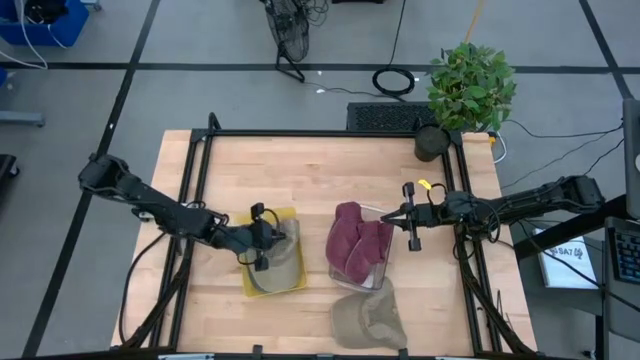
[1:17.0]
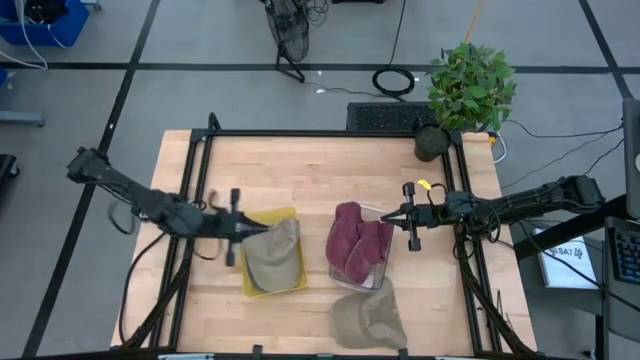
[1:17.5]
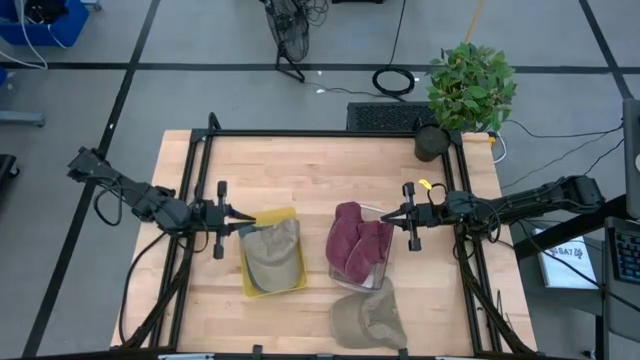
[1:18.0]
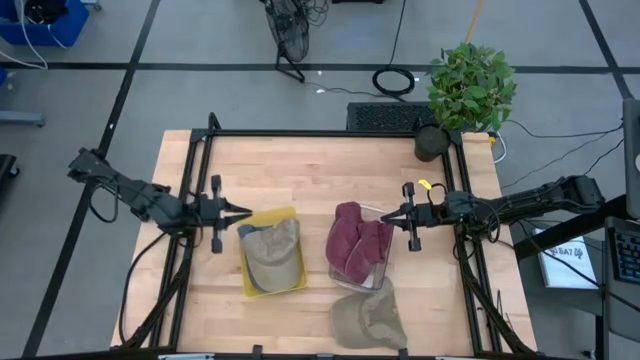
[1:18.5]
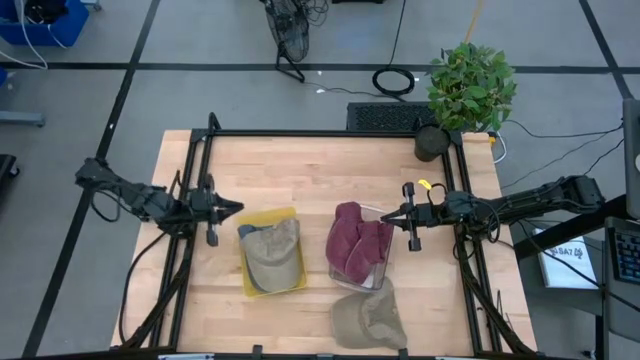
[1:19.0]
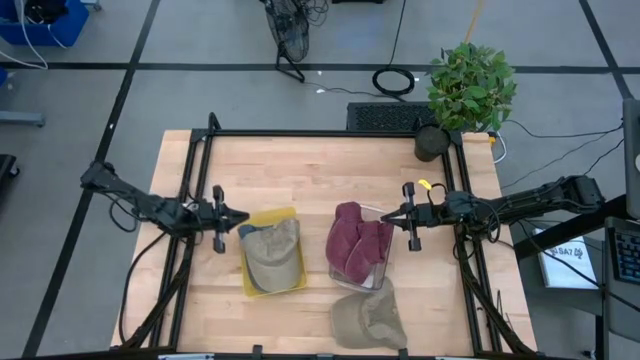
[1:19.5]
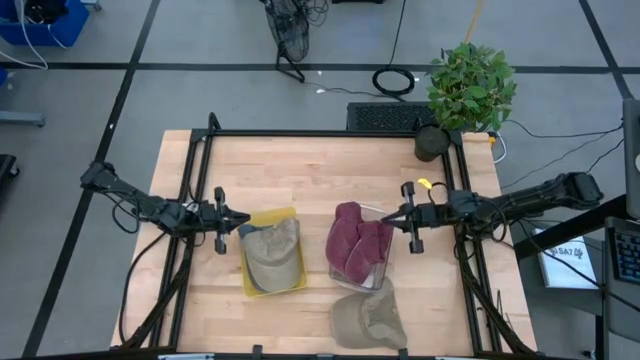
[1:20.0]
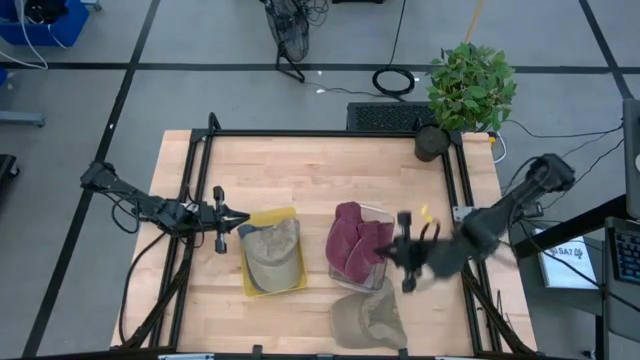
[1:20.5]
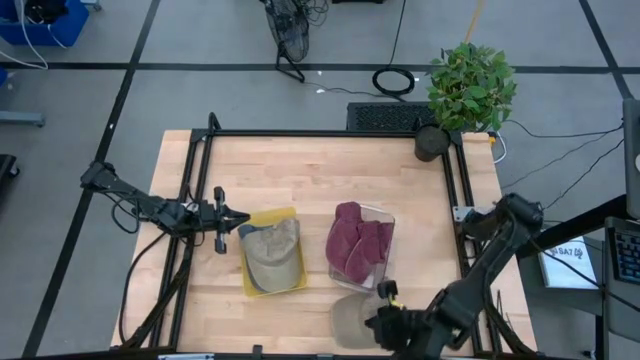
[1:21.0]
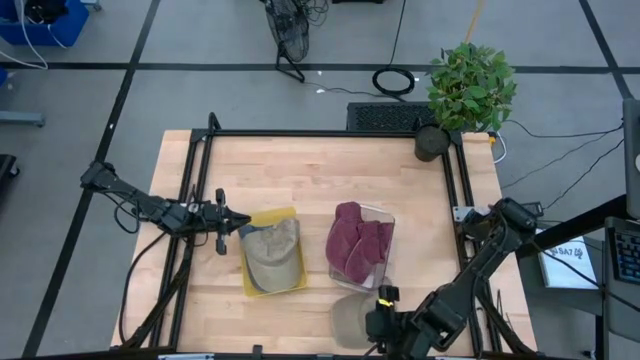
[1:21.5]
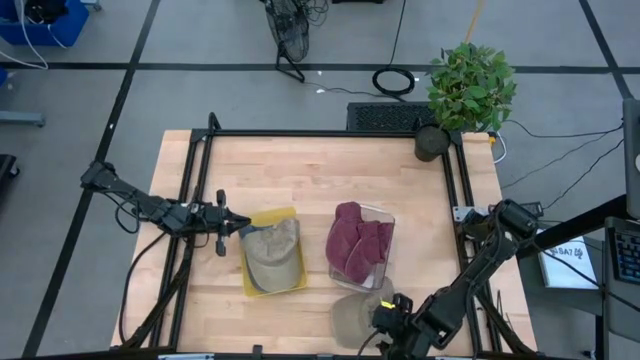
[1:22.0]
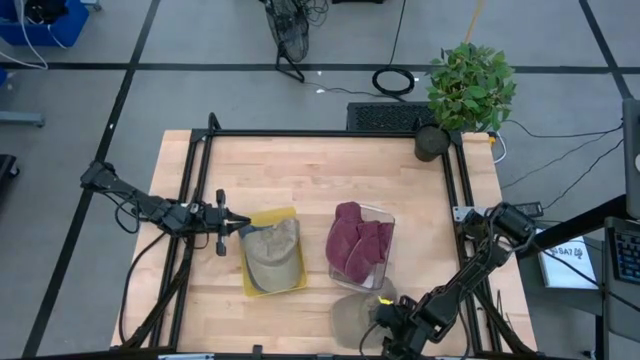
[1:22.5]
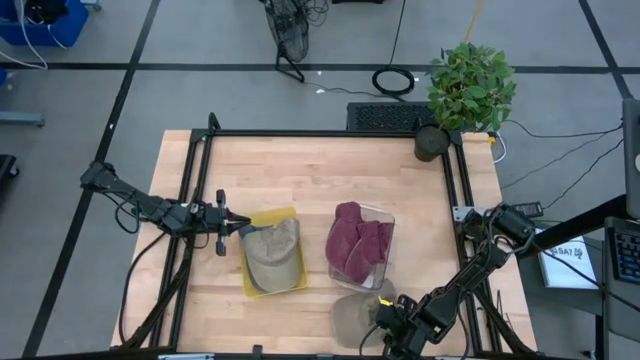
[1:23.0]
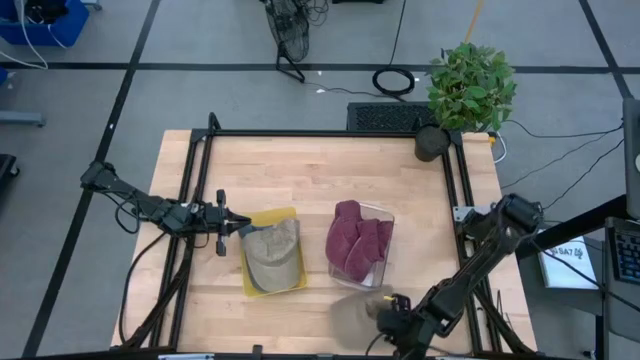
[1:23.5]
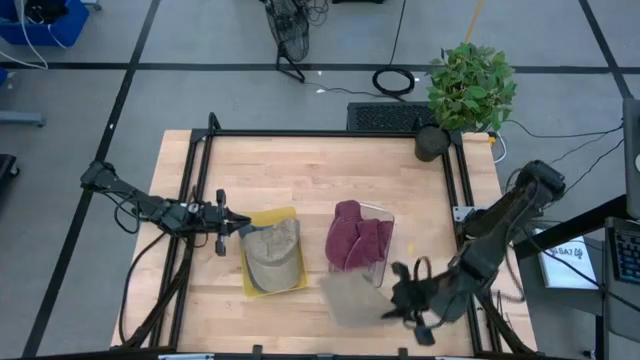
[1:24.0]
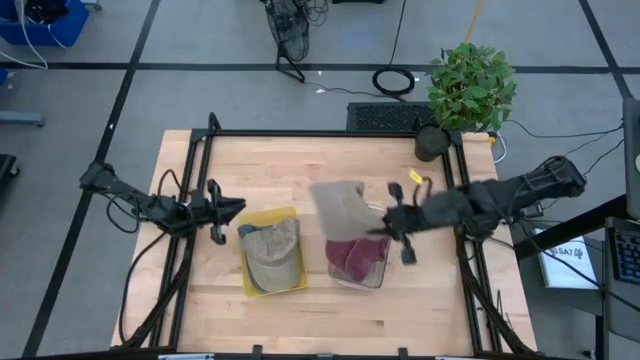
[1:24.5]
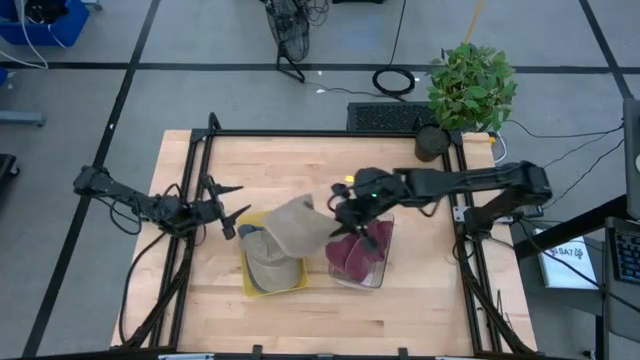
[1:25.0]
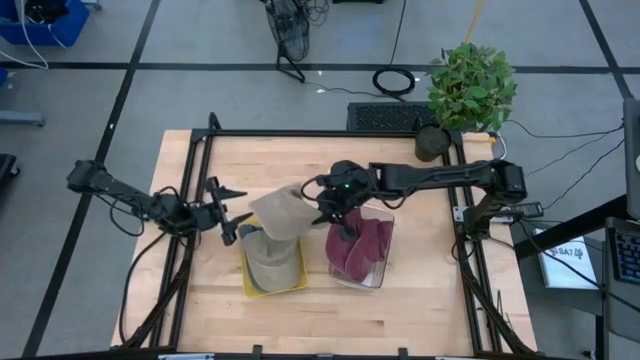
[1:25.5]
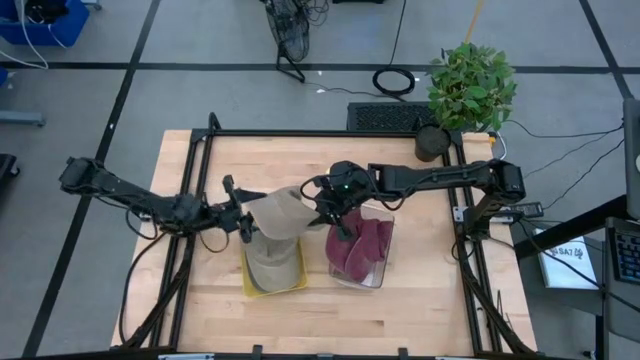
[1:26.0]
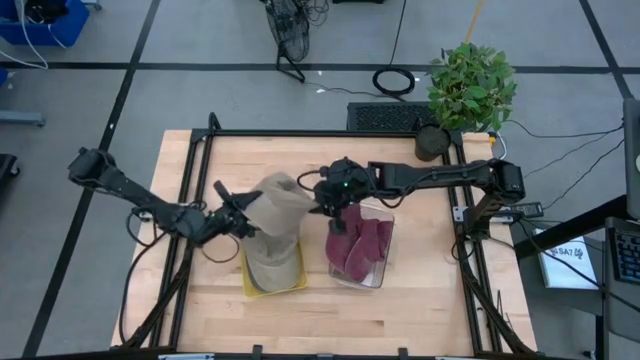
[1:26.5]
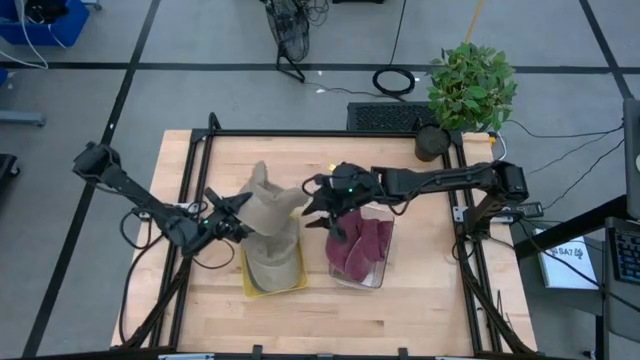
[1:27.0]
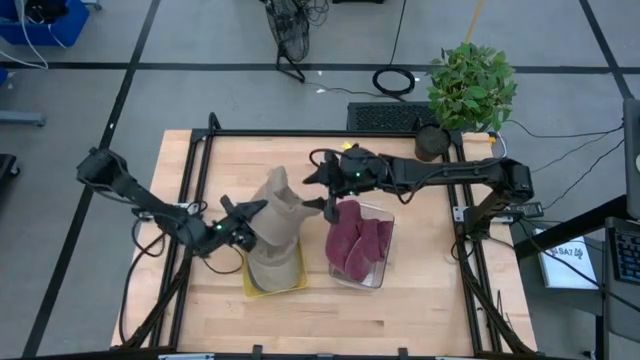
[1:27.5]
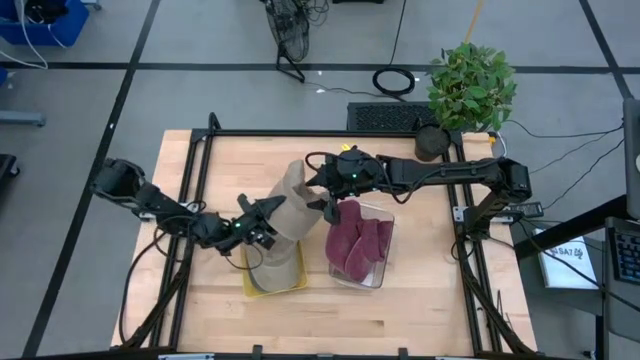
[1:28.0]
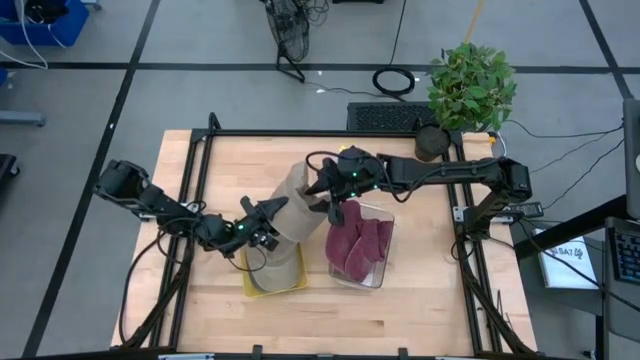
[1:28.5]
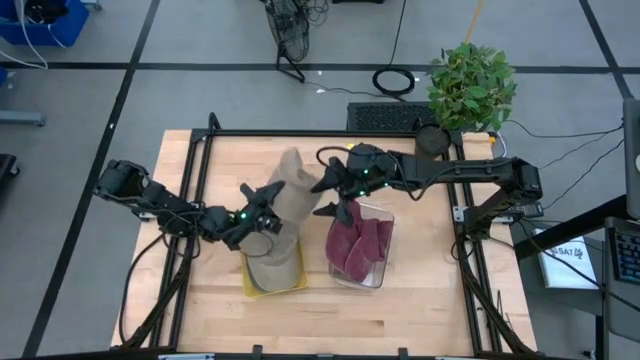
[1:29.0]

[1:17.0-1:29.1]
Task: Pick & Place hat
Put the brown cap into the yellow bin

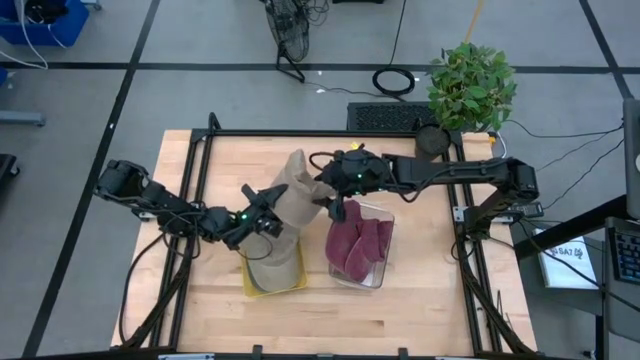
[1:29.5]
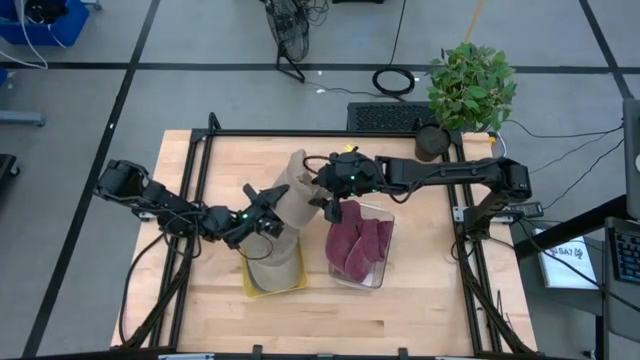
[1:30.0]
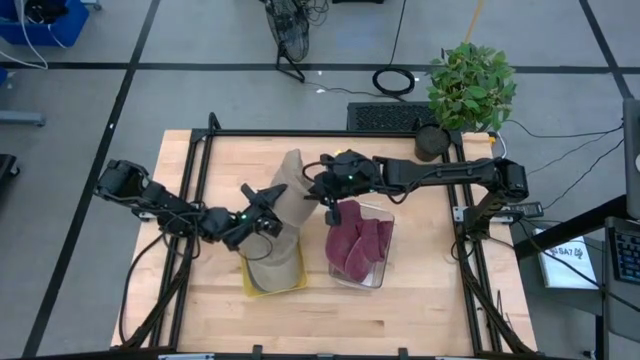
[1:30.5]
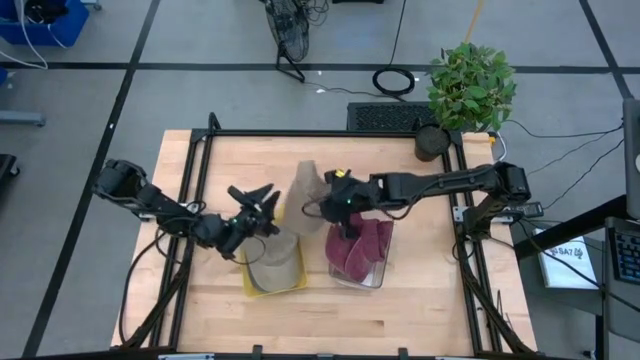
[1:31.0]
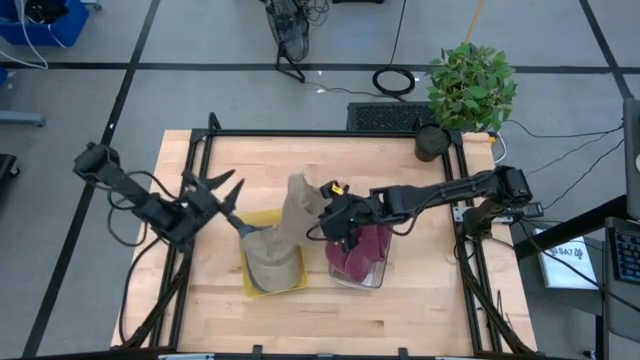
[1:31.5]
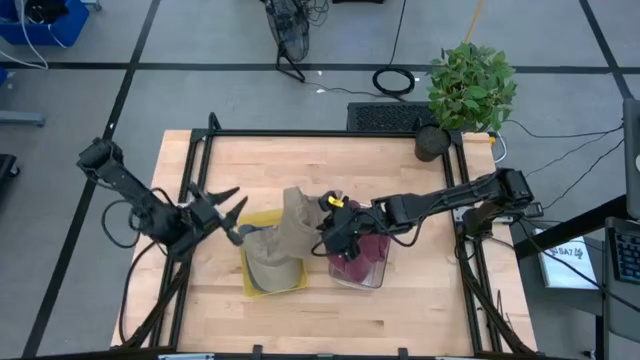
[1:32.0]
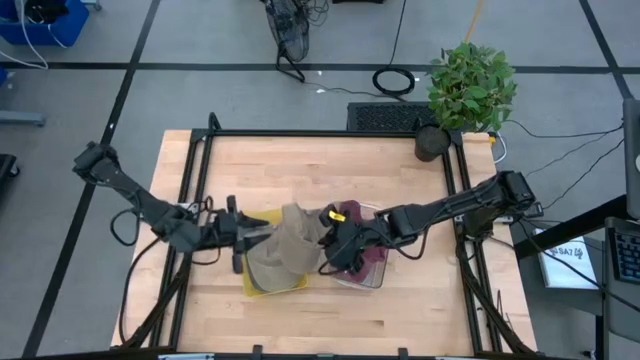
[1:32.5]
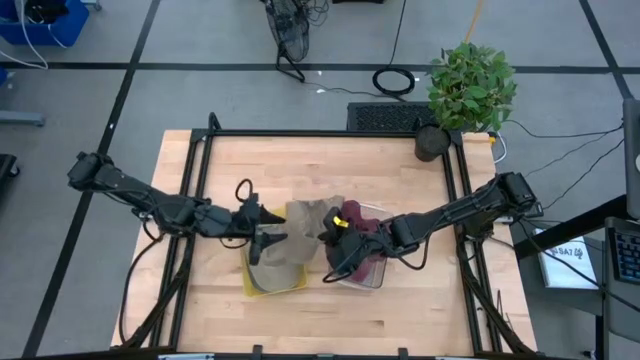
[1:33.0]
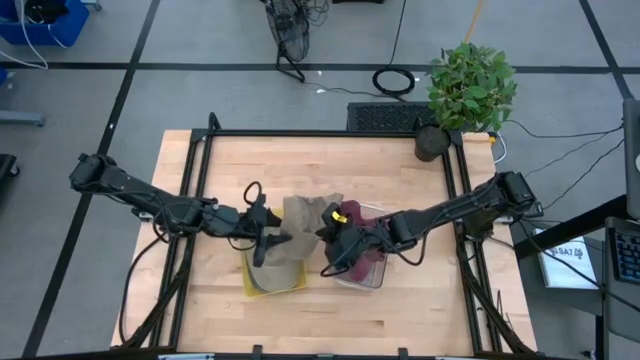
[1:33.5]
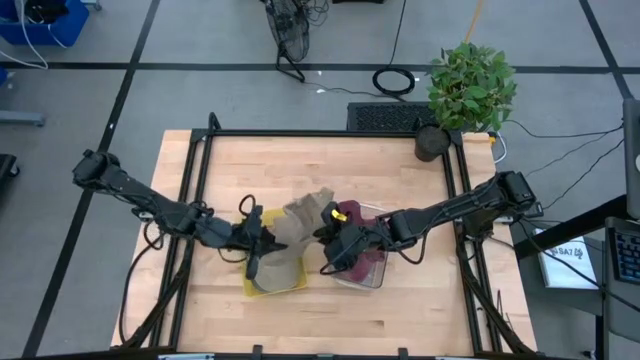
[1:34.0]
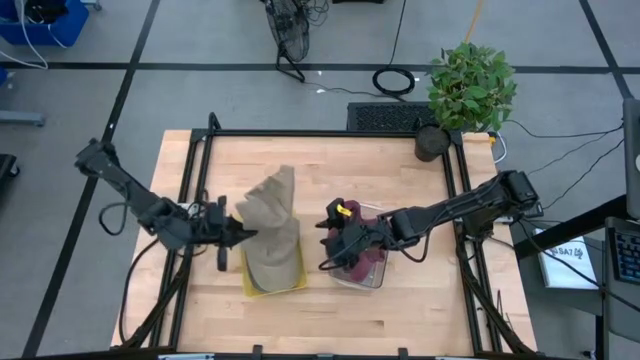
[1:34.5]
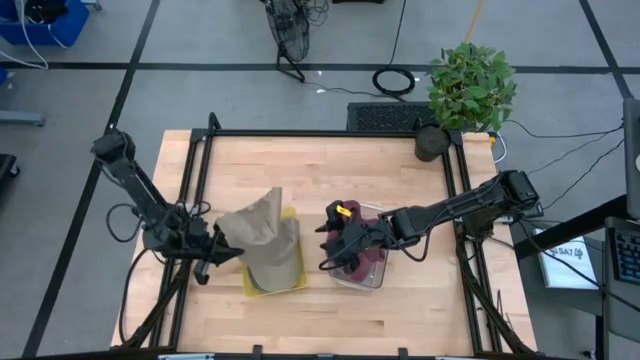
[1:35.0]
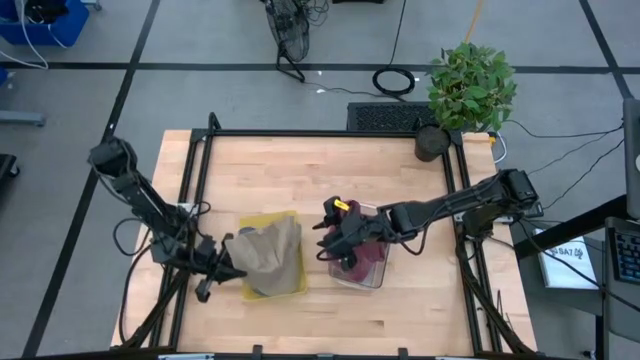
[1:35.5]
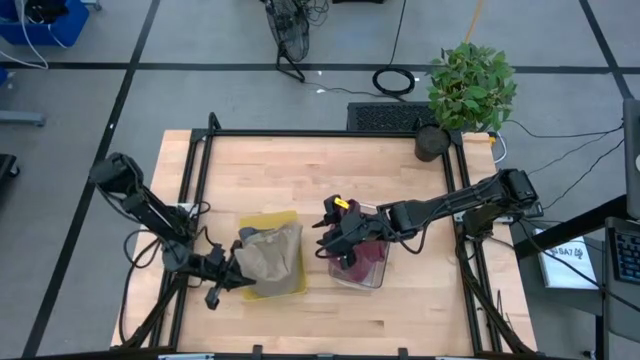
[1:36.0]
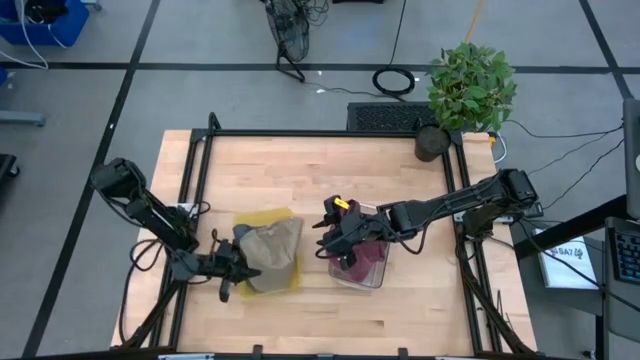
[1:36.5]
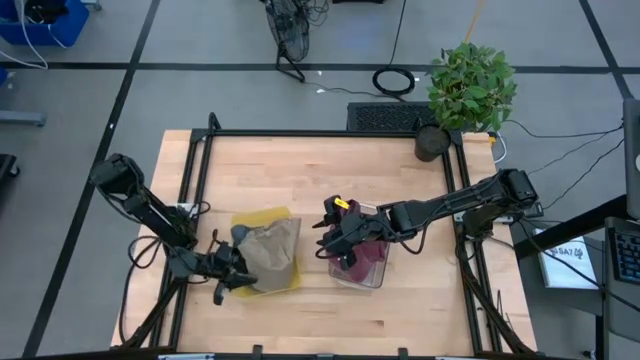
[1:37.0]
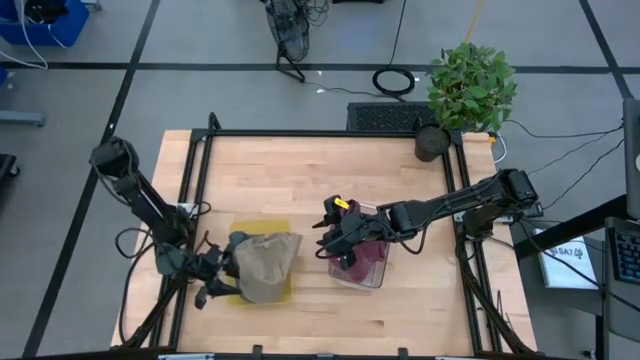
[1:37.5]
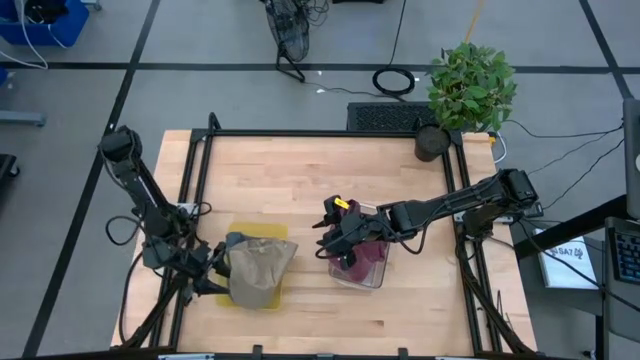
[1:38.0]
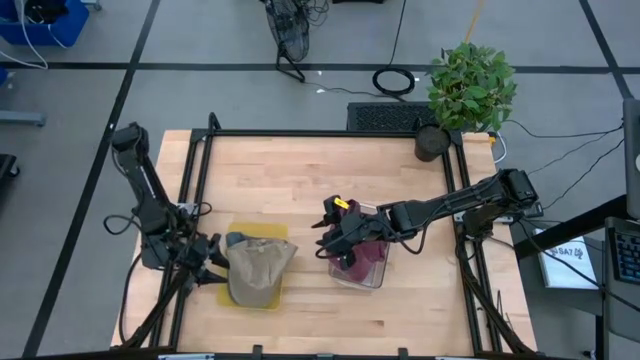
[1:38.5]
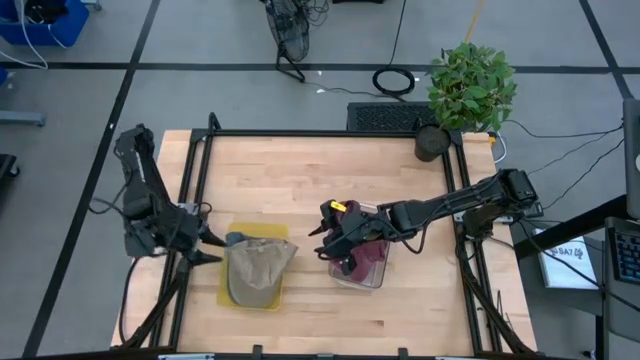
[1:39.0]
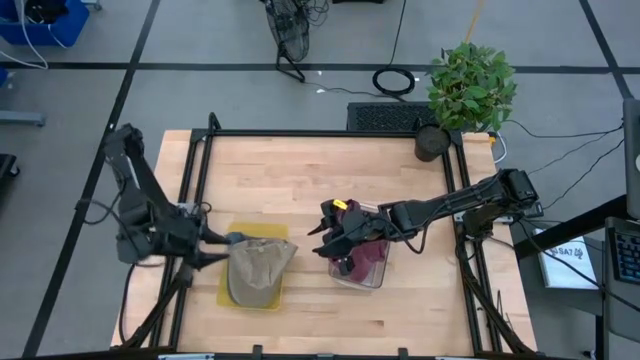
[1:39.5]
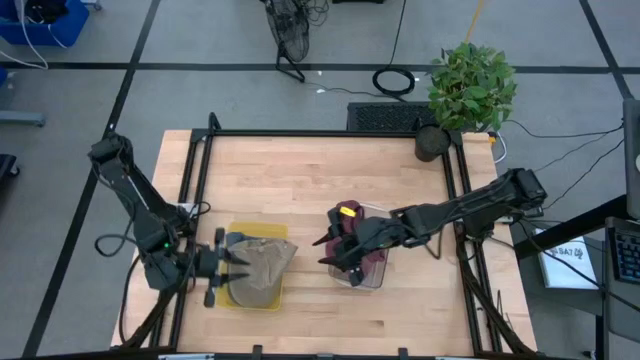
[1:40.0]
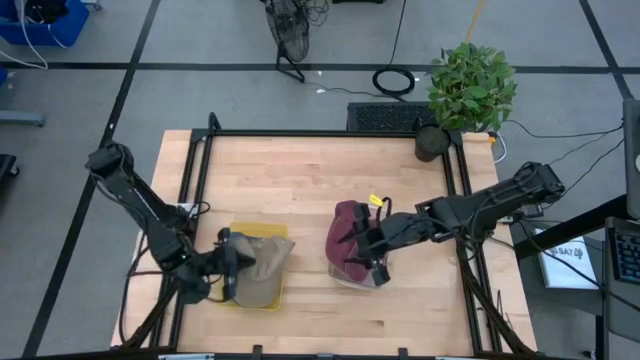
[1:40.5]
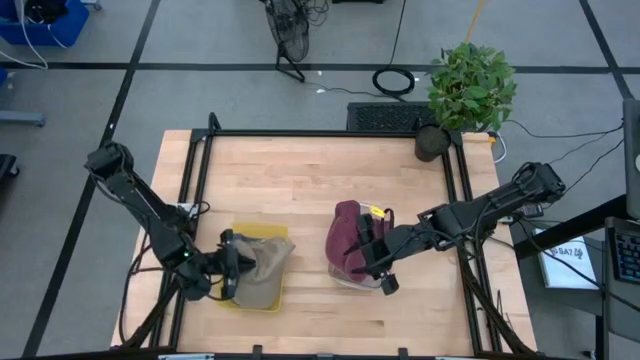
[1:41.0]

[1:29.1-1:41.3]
Put the brown cap into the yellow bin
